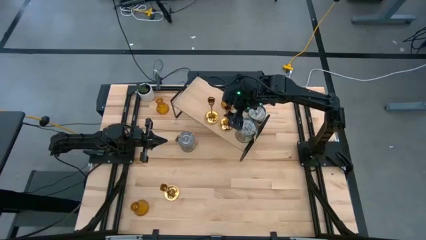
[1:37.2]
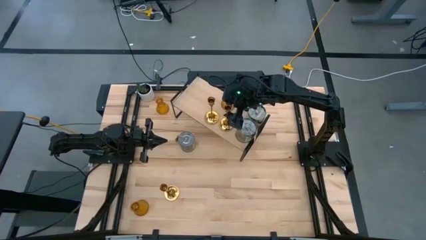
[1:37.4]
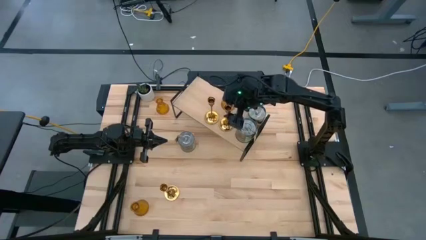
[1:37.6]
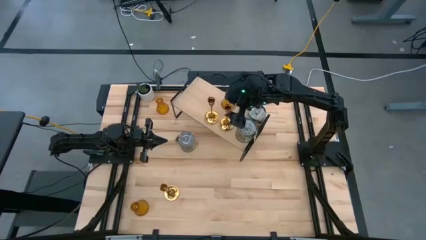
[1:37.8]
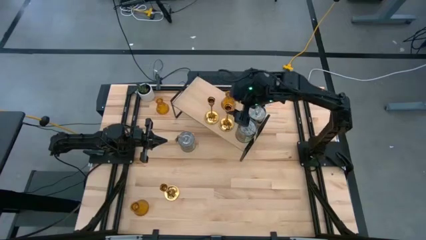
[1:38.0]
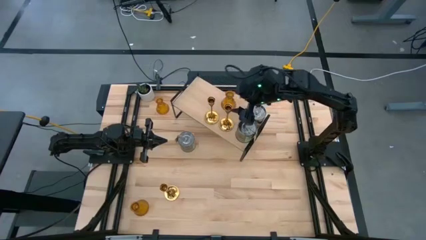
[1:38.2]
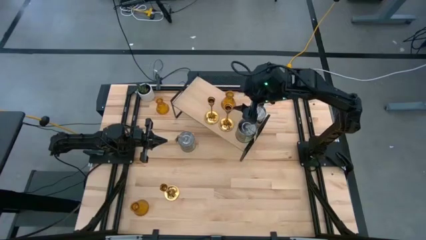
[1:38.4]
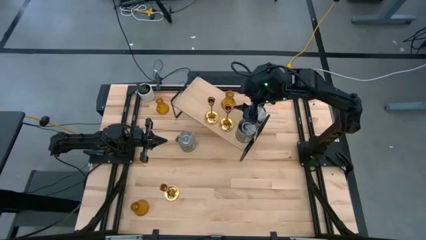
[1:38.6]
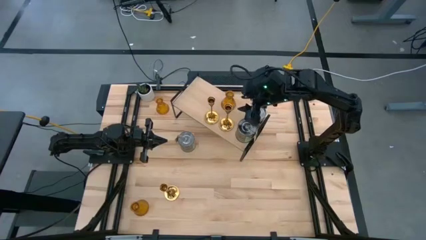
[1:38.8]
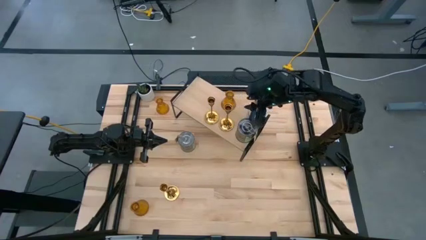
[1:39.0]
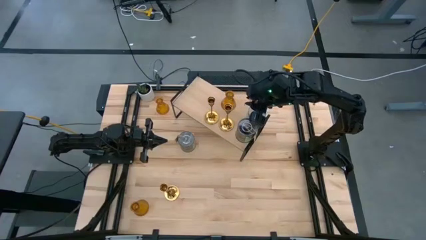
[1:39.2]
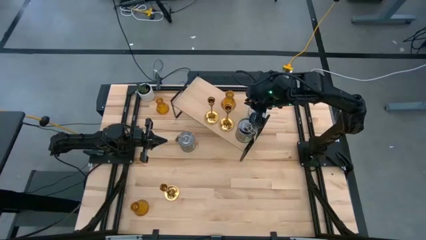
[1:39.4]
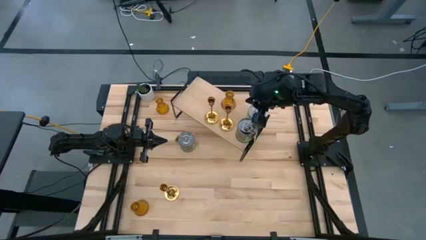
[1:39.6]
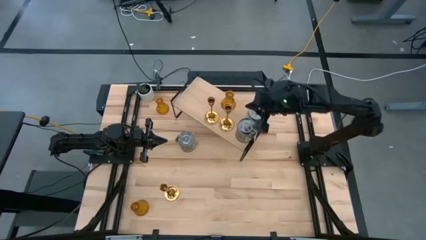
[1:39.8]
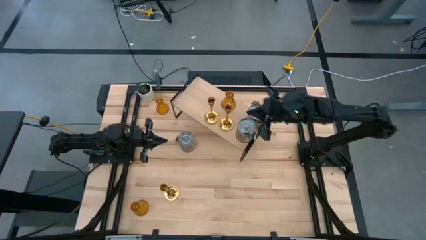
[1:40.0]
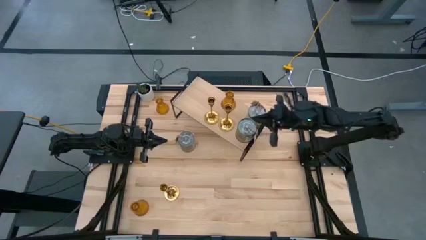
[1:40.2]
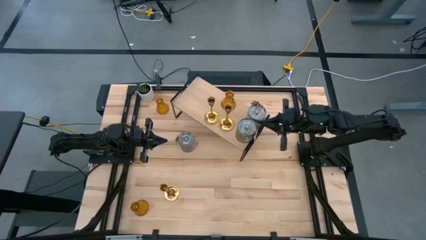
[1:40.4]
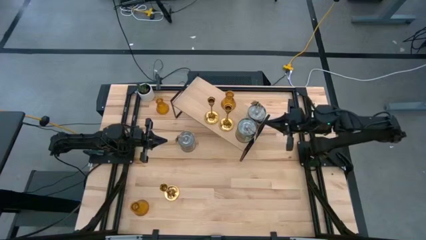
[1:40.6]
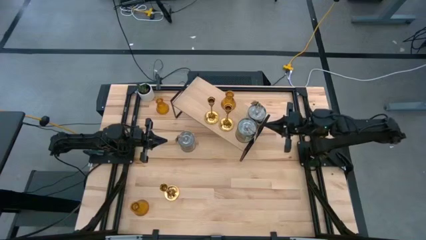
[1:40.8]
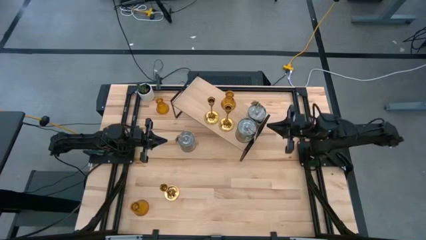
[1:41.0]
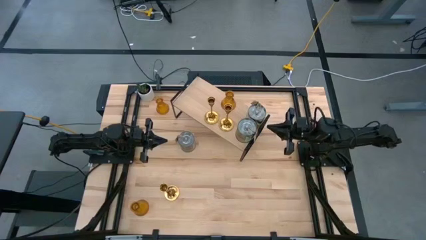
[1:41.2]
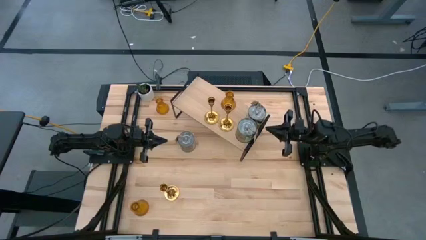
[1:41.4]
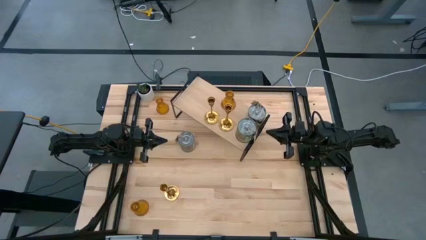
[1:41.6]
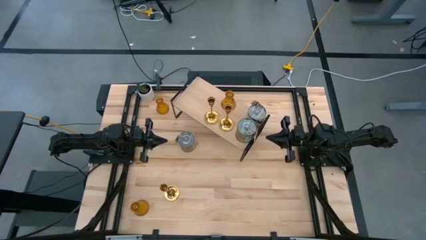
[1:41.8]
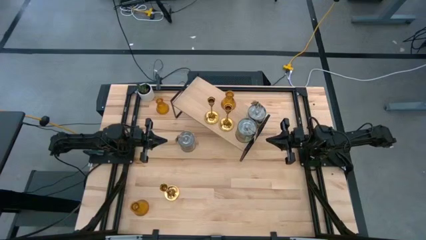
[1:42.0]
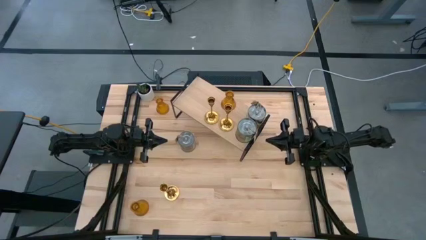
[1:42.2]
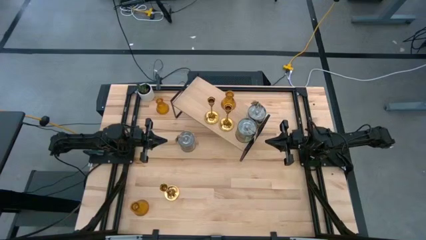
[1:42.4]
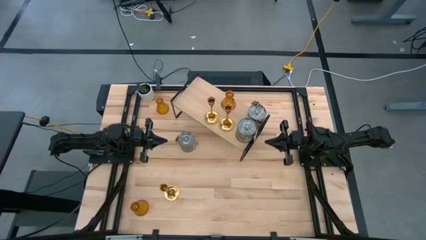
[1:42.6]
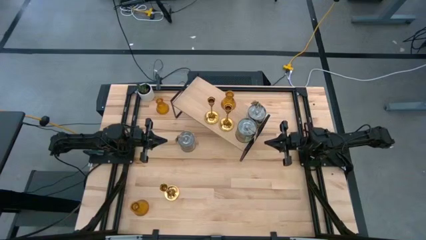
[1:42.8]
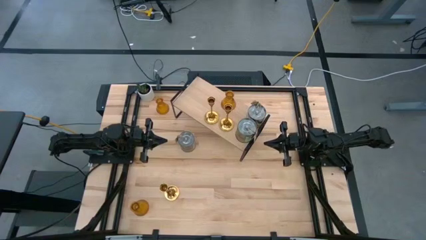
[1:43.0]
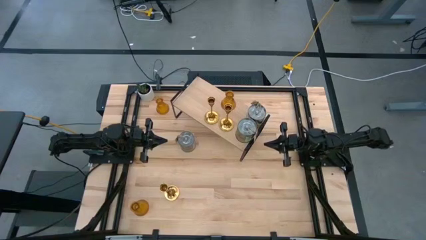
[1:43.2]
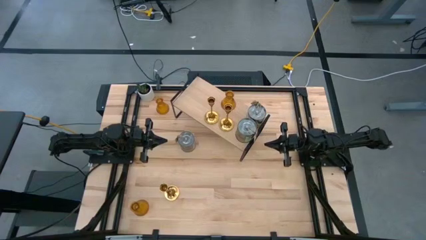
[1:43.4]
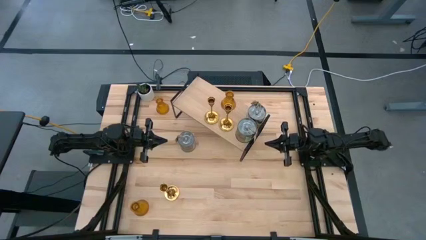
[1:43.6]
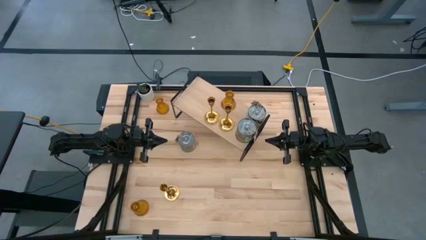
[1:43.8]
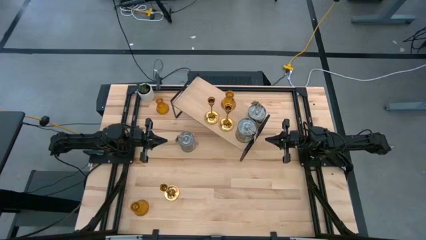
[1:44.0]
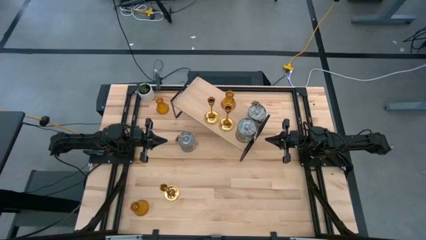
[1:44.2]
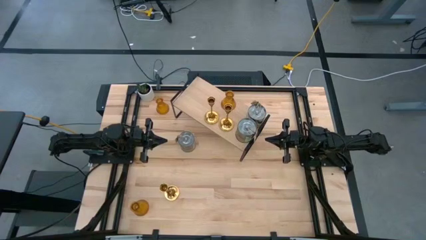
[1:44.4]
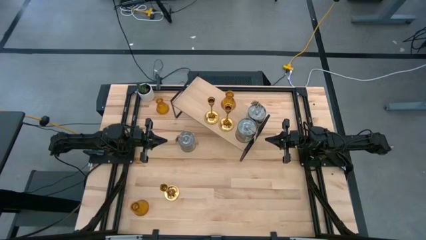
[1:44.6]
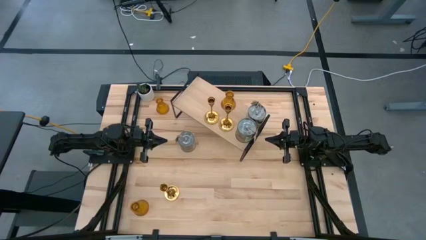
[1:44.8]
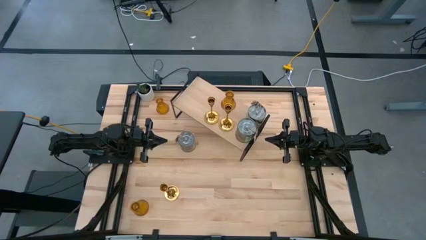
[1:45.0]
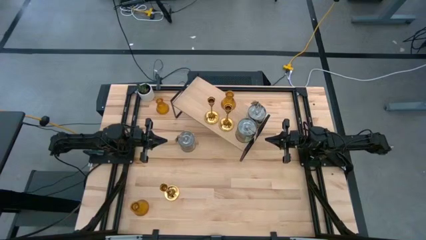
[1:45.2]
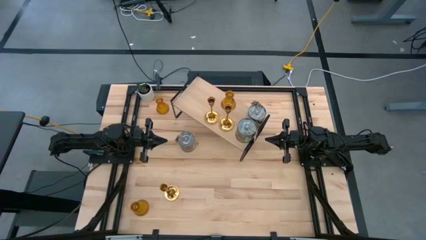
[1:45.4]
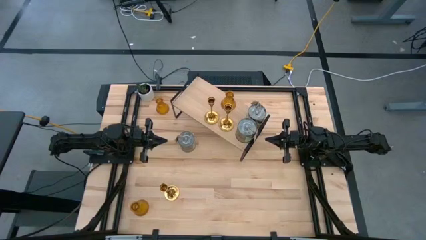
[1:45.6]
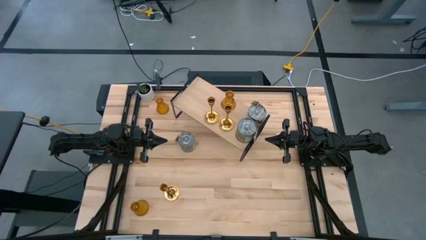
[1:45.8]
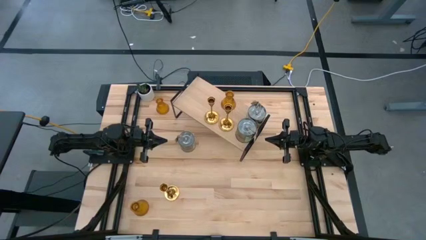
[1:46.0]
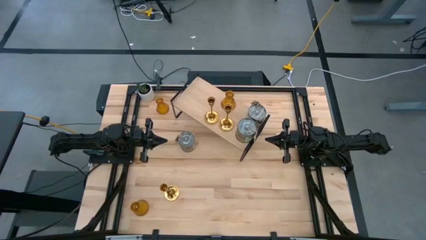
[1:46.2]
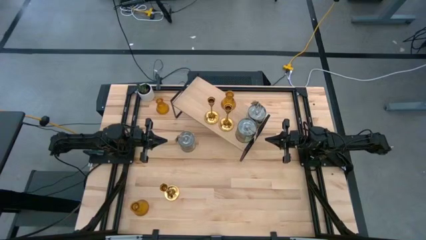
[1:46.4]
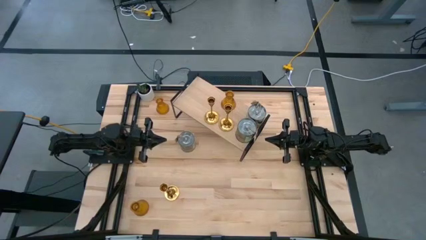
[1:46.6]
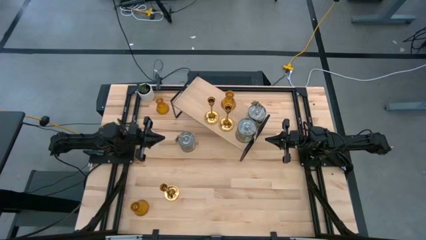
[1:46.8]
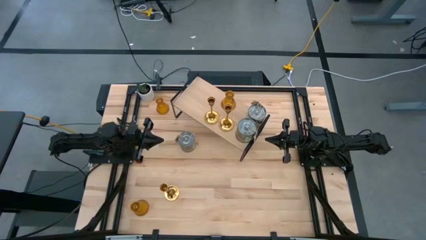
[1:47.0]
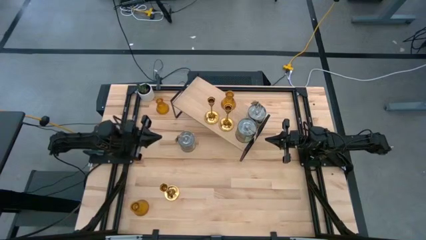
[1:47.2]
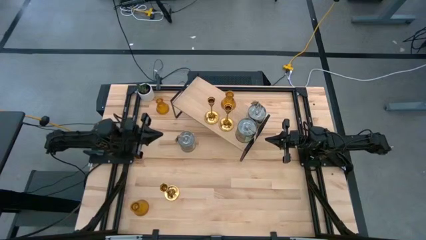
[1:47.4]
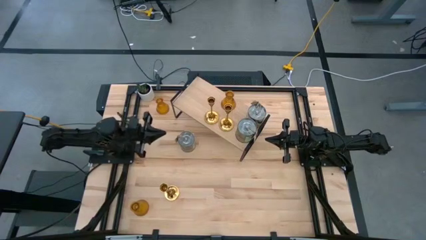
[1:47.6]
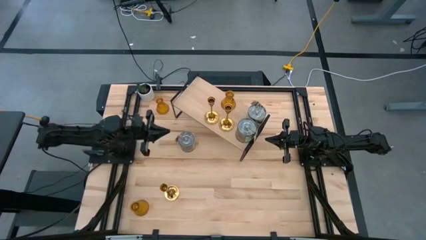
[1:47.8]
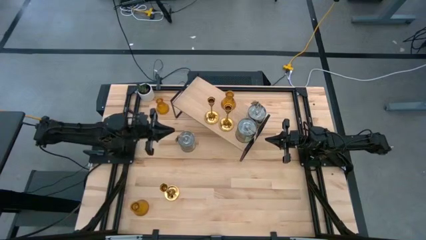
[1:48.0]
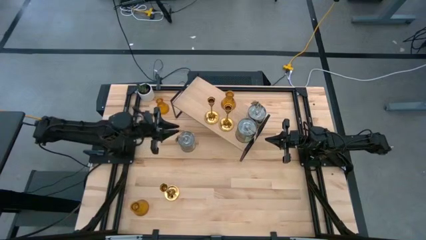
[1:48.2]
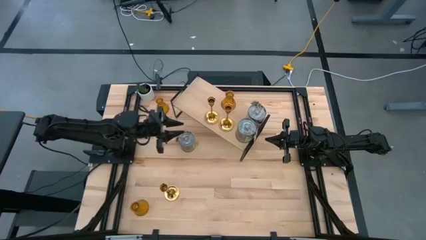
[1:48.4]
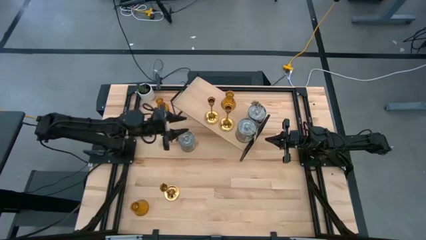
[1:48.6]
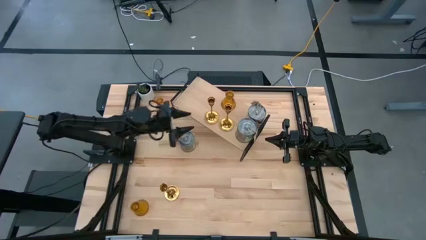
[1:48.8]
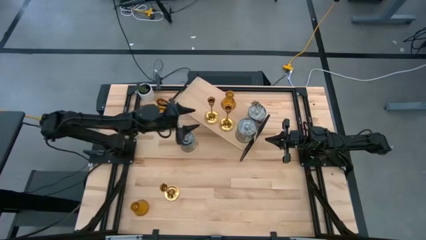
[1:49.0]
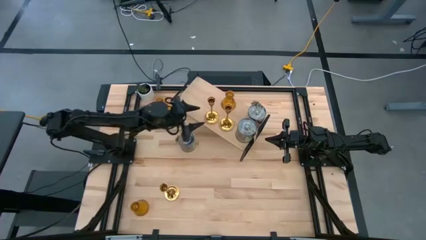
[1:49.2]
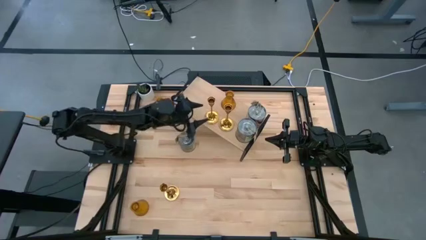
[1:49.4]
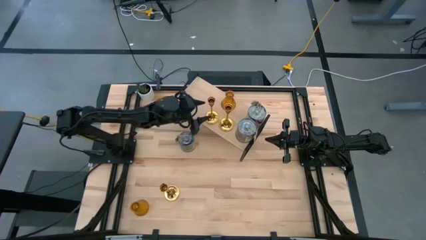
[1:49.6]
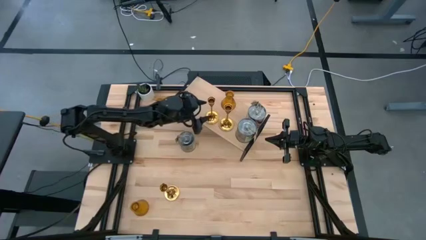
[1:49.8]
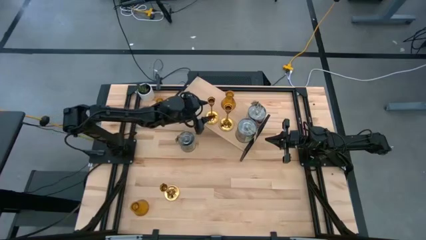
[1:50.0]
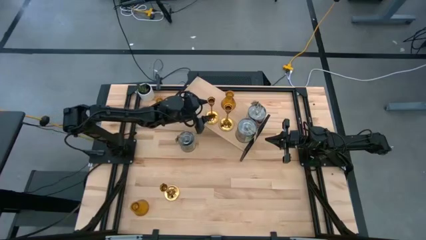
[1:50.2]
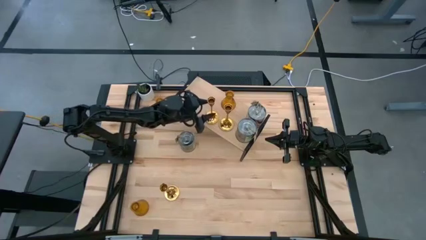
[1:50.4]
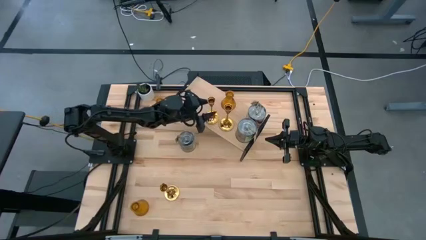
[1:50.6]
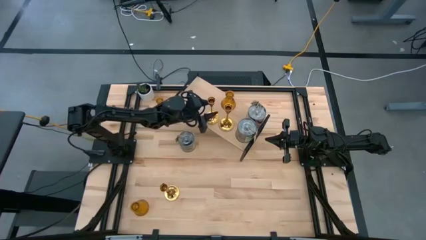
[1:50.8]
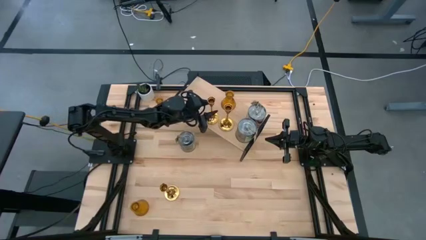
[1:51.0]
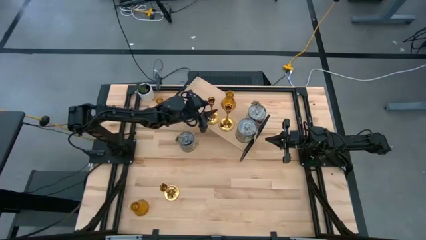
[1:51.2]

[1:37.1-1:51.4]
Task: Pick & Place candle stick holders
Adjust the gold candle holders on the shelf
